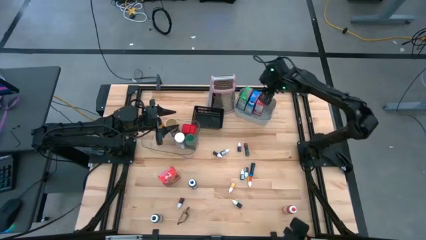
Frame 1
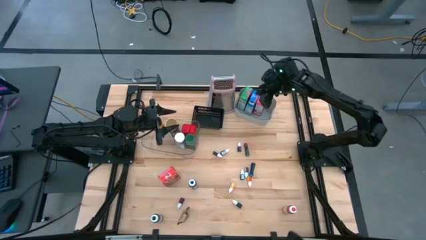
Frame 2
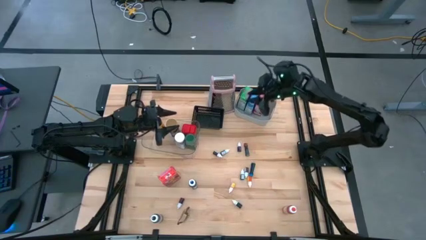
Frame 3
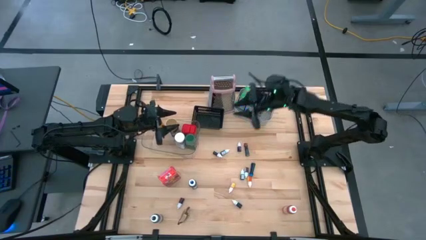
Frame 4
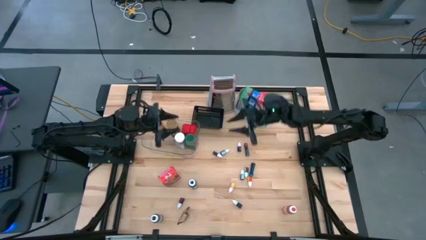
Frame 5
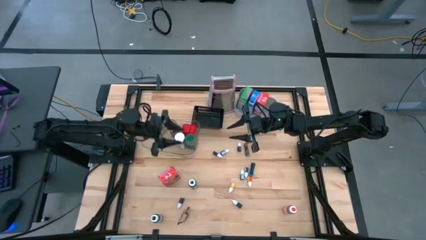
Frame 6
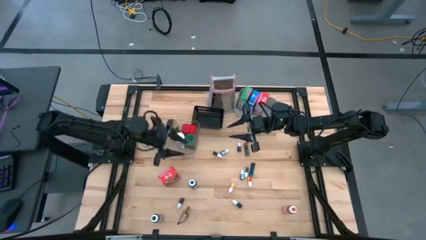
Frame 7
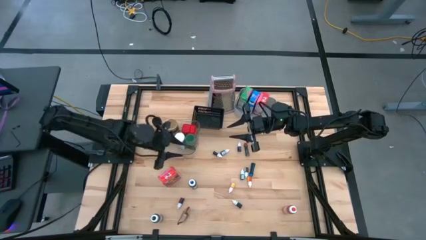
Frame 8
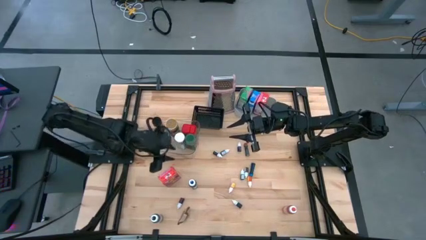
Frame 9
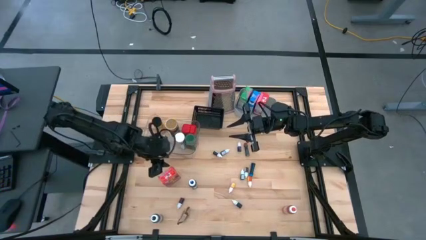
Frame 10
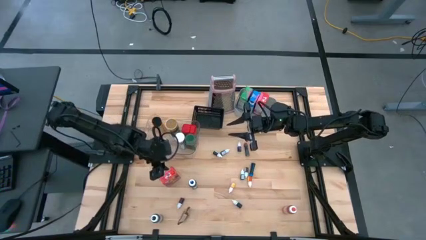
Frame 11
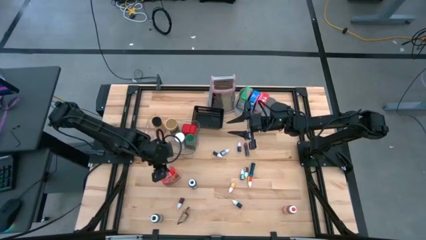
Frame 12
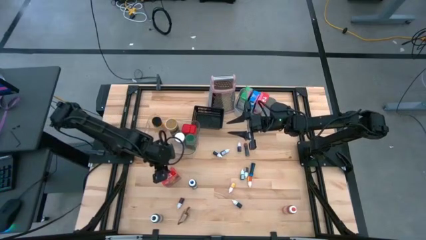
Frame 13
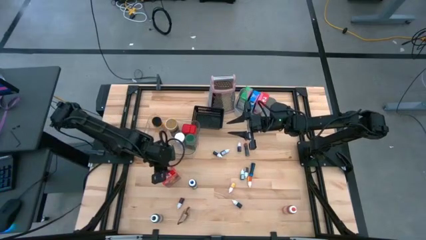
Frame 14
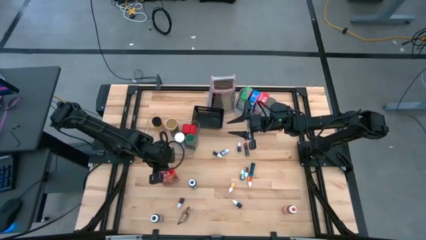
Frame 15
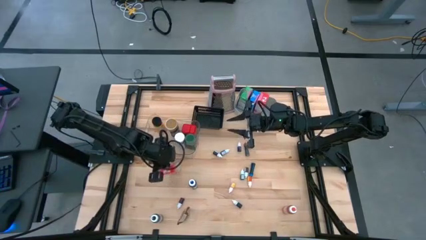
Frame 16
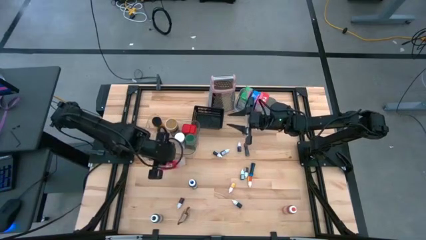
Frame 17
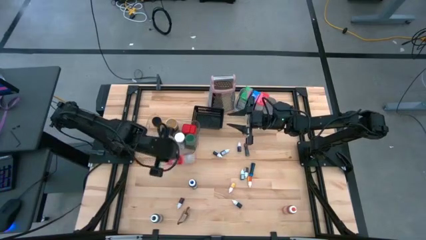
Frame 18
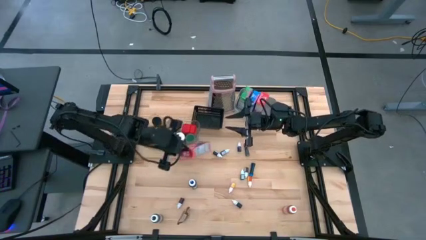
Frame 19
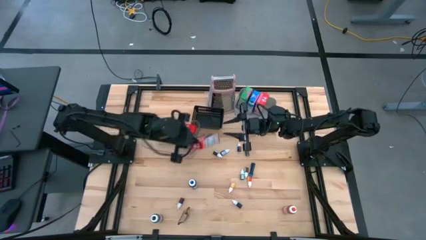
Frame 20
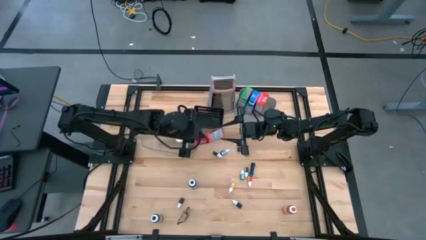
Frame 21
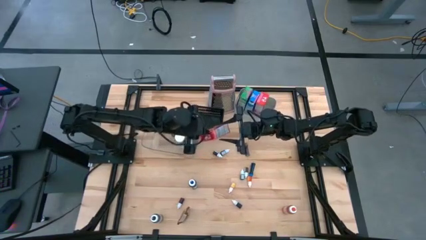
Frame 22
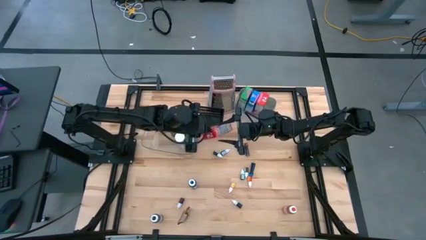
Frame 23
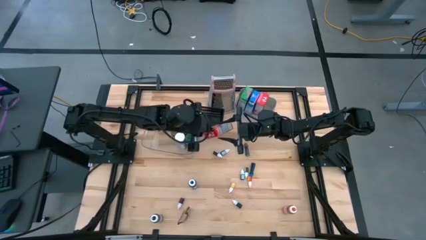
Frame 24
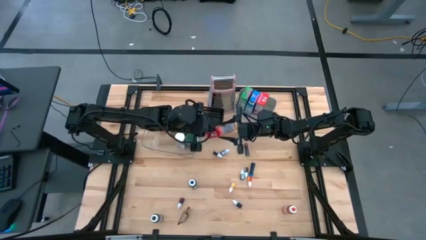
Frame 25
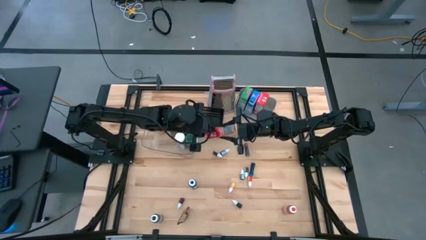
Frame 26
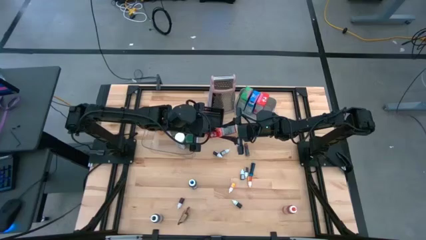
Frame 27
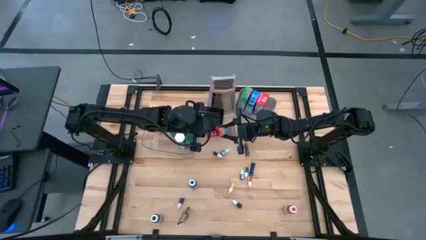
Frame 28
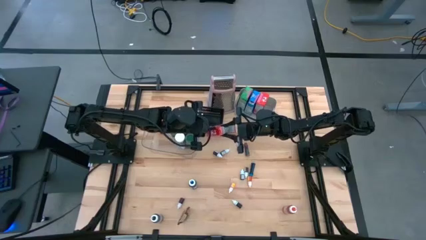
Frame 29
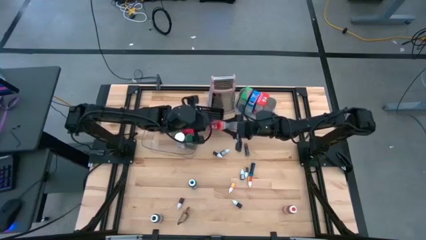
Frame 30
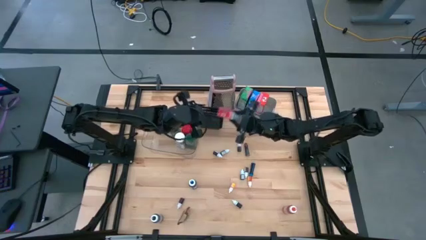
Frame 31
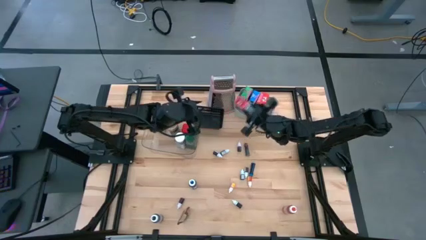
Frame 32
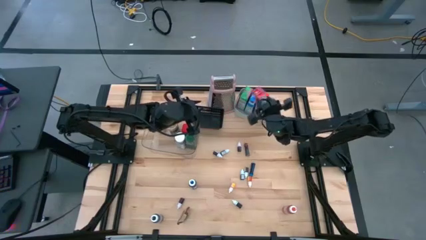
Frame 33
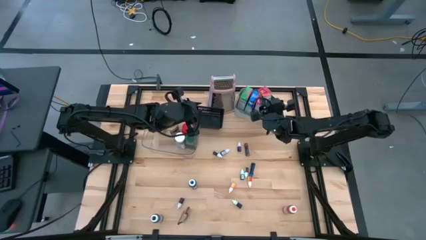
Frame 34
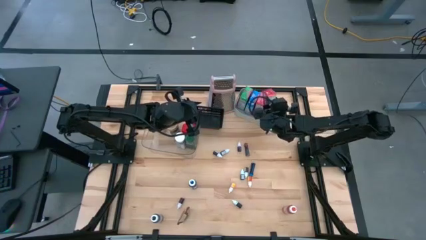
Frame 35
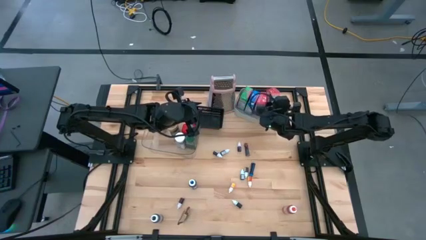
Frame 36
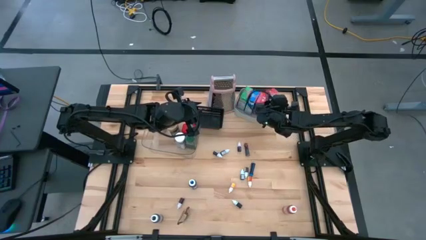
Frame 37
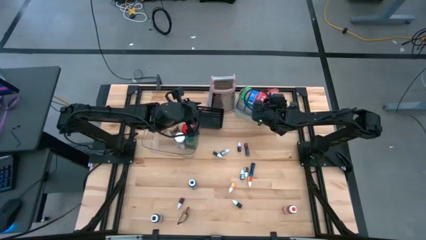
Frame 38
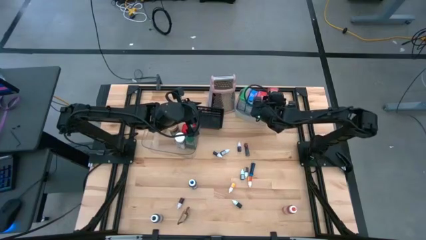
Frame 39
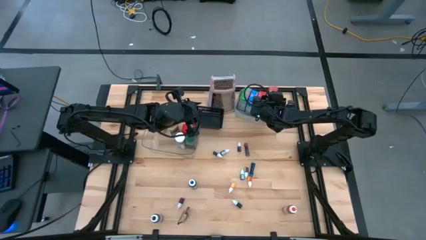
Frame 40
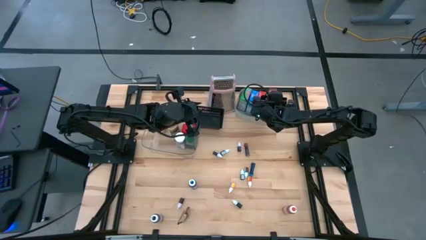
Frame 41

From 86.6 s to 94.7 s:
Task: Pick & Place Kitchen Items
Put the red cereal box into the gray bin

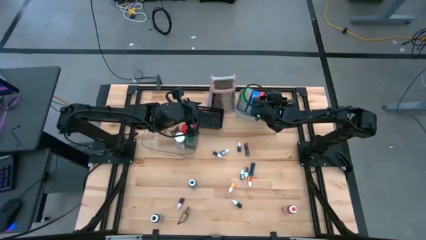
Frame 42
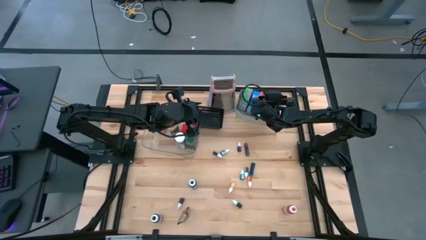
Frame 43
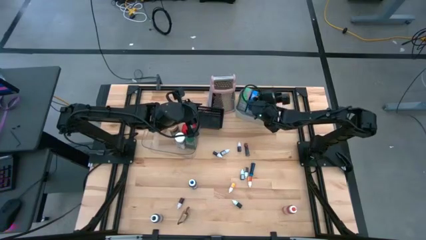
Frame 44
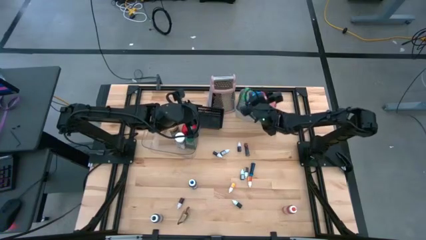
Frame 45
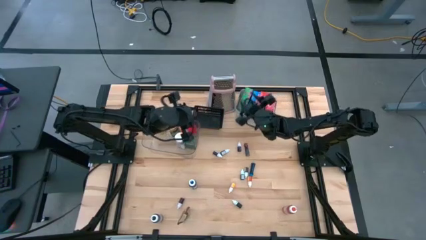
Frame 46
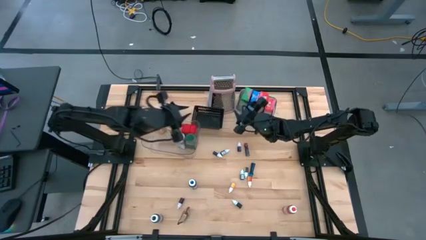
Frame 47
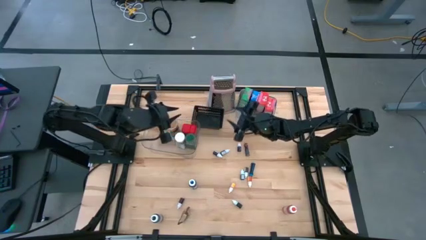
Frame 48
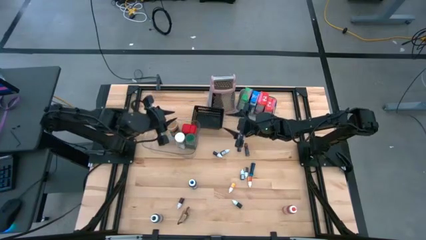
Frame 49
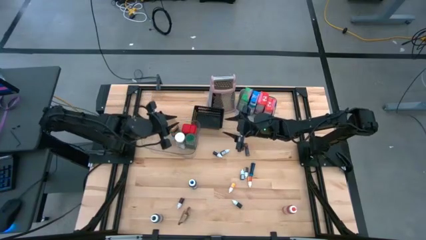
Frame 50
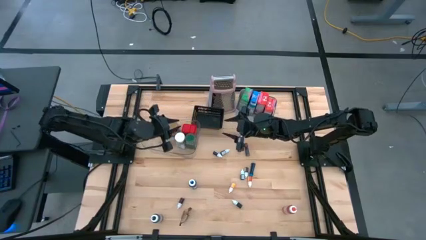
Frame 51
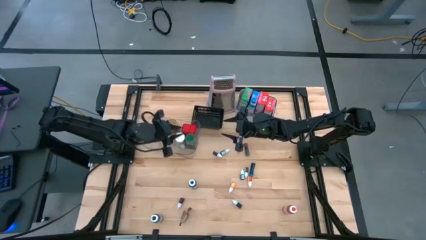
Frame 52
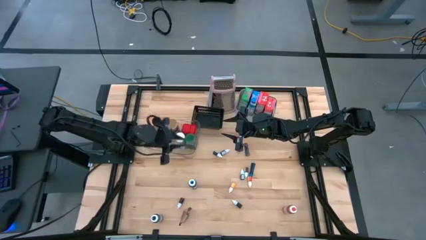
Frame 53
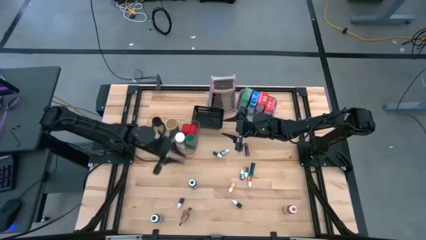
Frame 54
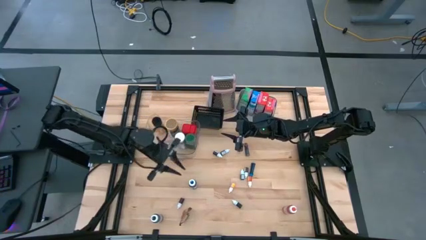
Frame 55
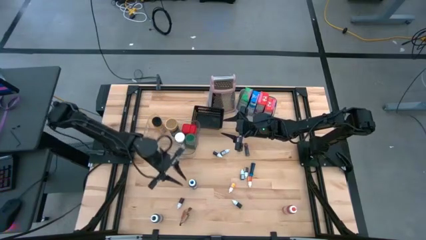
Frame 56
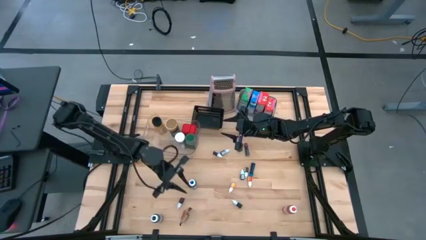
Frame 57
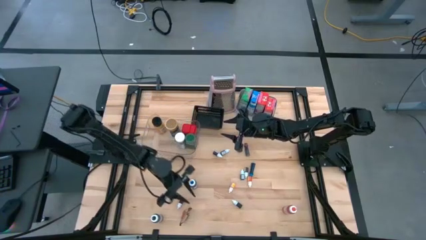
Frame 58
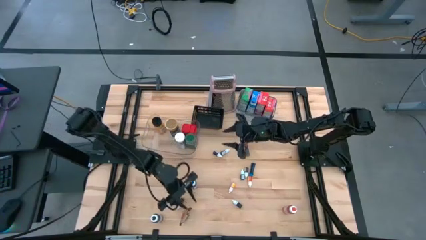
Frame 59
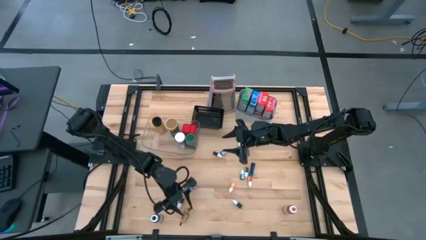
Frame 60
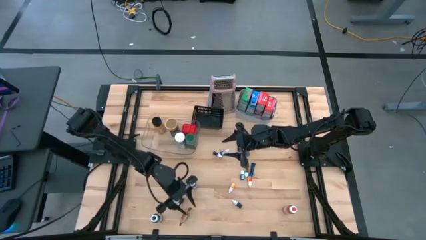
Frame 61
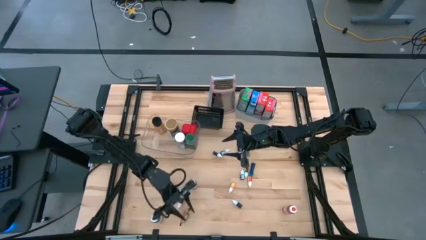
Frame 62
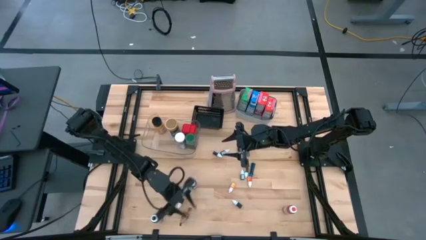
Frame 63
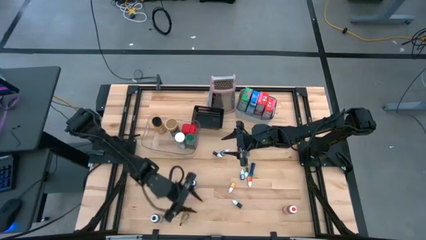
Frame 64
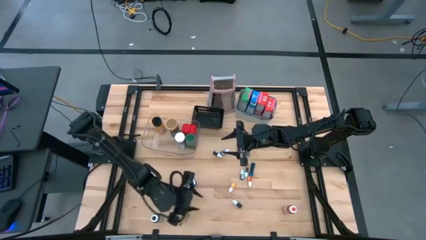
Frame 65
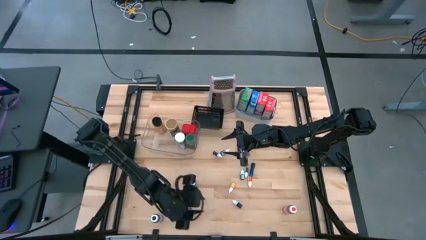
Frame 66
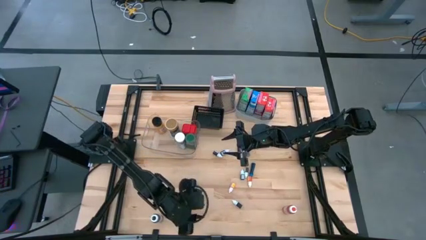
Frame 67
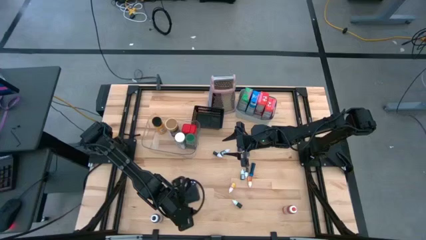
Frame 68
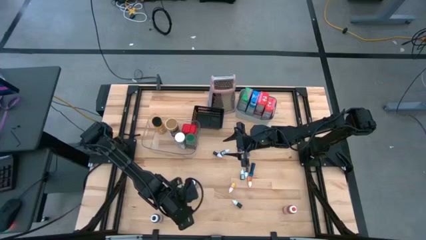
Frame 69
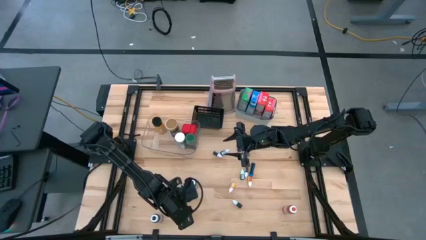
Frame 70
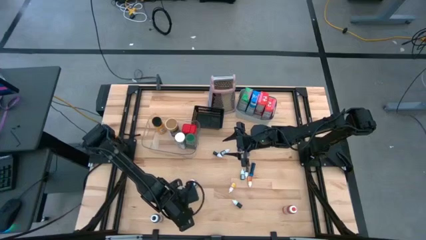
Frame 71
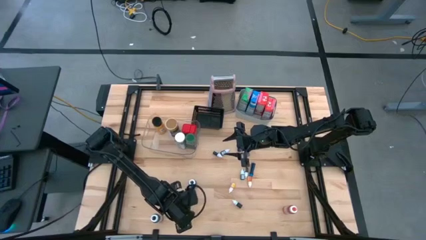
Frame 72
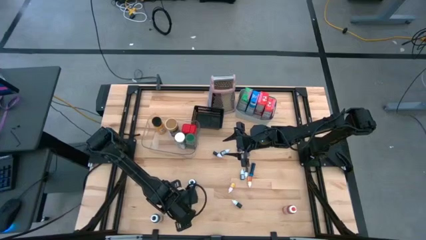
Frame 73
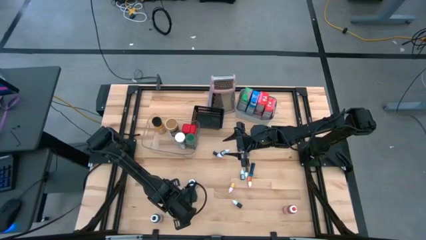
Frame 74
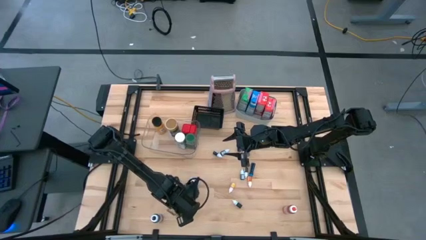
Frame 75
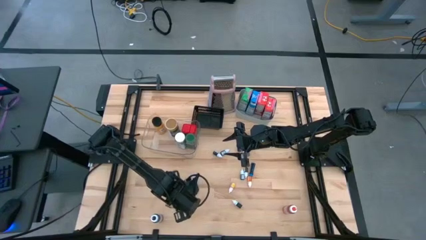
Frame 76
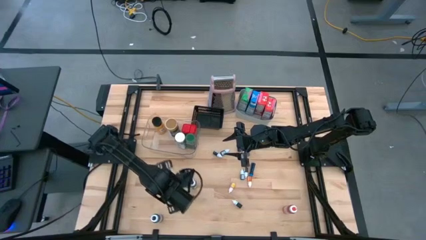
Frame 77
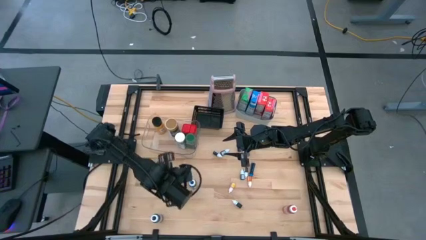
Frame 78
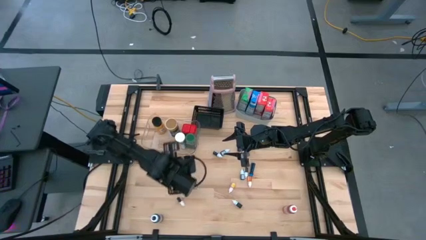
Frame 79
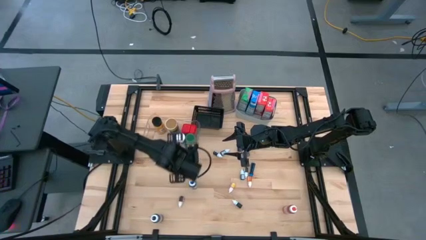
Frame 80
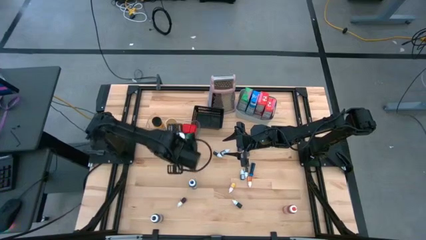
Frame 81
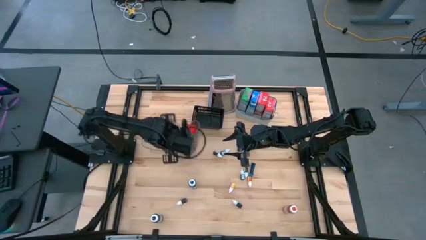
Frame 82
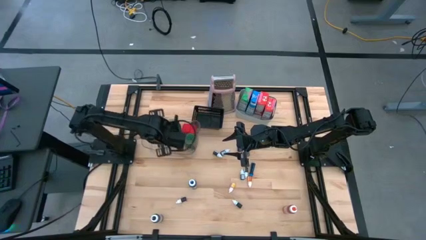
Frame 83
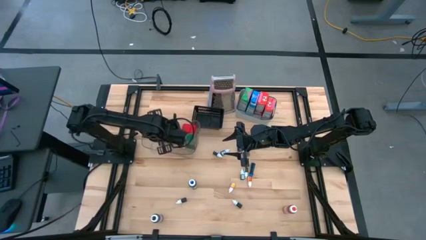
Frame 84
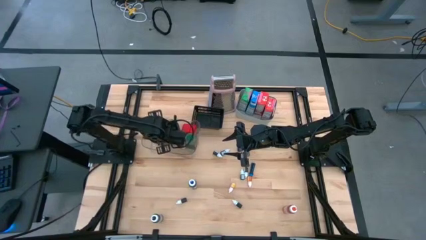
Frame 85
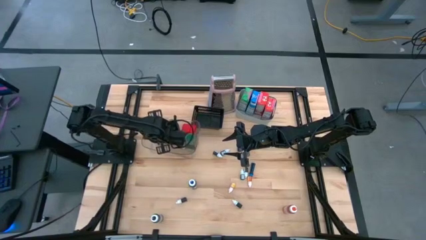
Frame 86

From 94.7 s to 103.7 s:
Put the orange seasoning pack into the transparent bin
